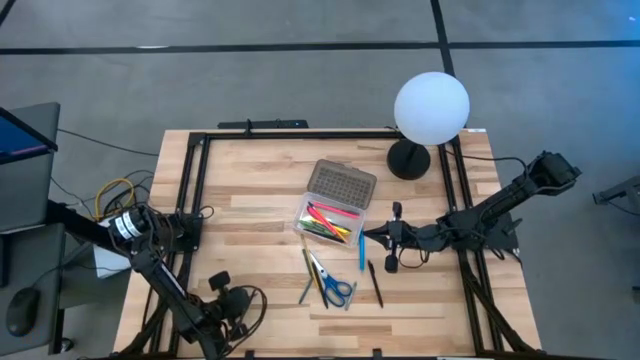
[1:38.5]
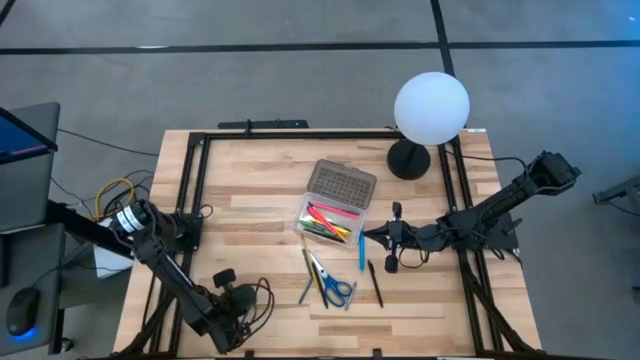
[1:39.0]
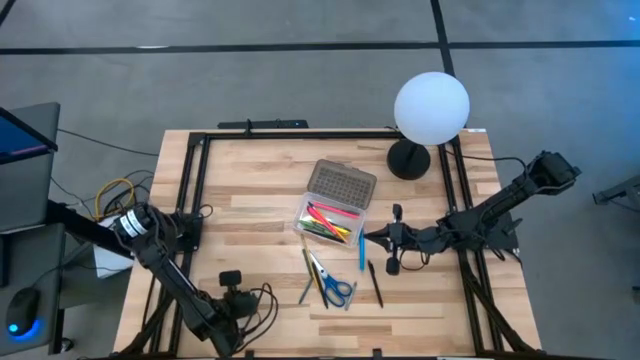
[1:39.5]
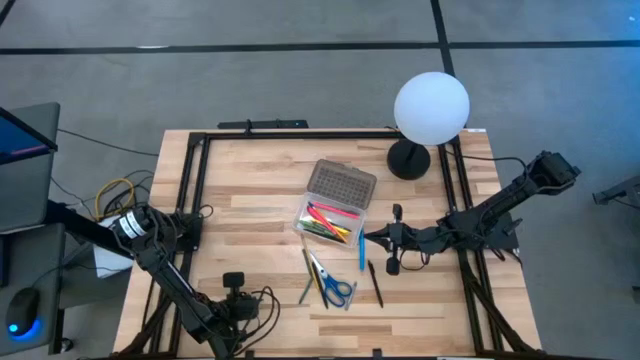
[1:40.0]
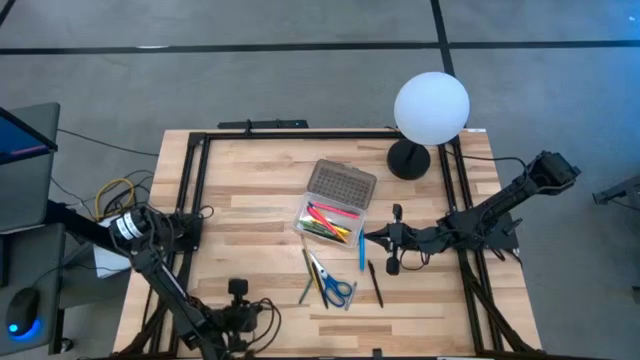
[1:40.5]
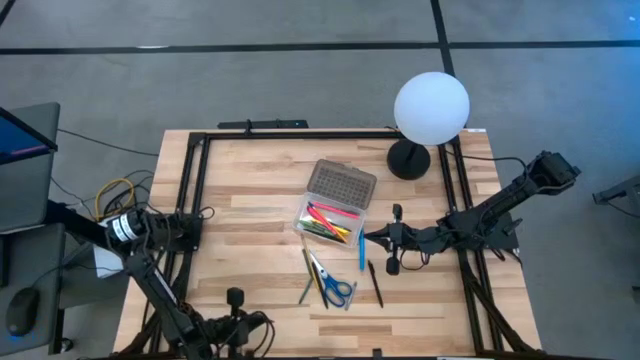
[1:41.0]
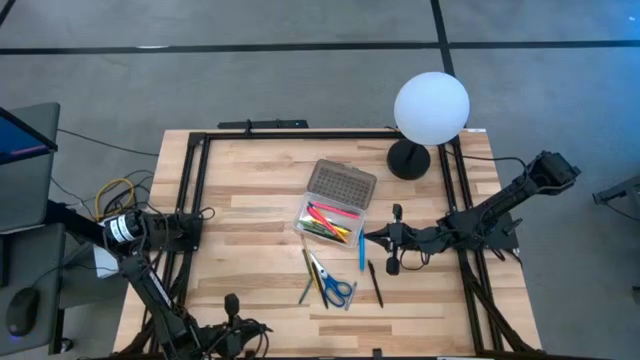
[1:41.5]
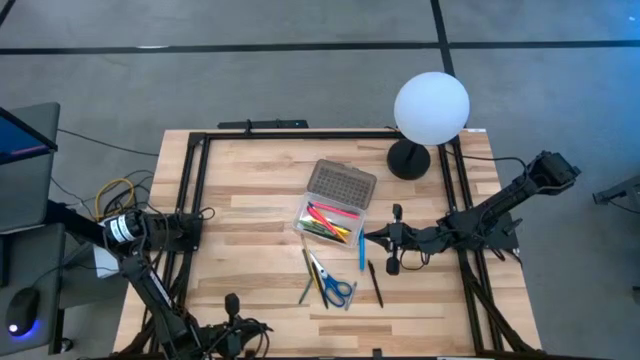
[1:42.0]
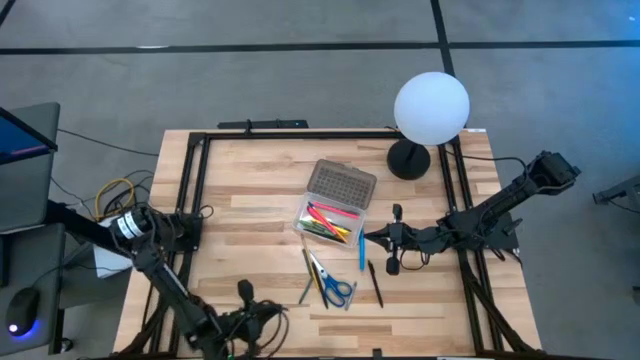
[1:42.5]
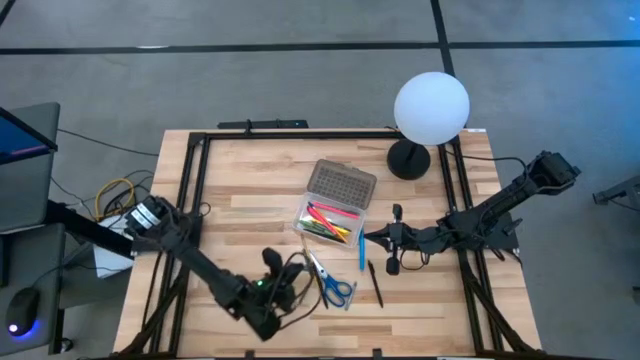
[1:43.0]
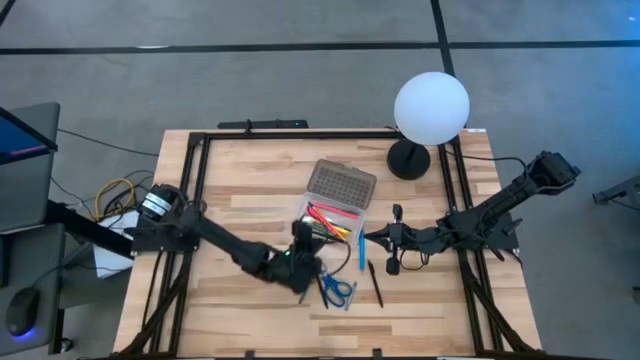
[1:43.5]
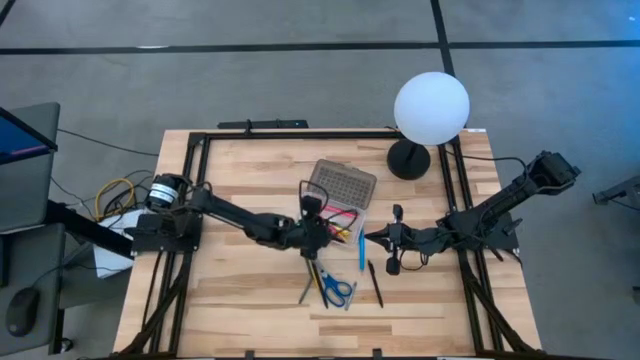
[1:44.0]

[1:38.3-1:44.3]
Task: Pick & place school supplies into a supply box
Put the green crayon into the gray supply box

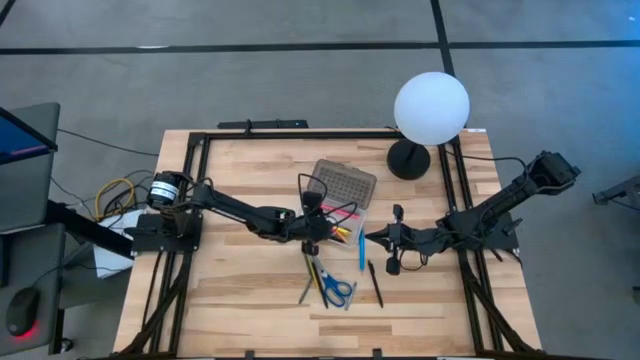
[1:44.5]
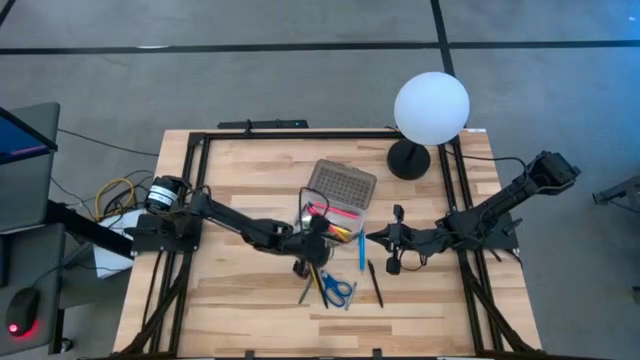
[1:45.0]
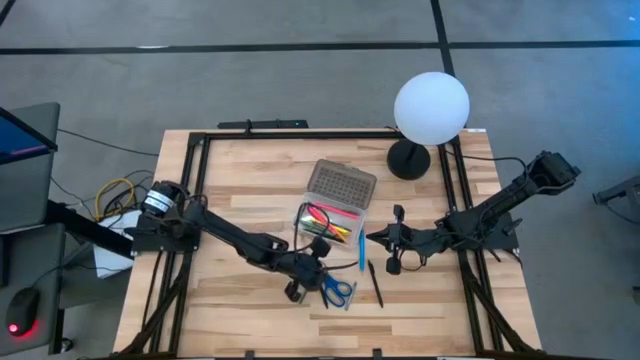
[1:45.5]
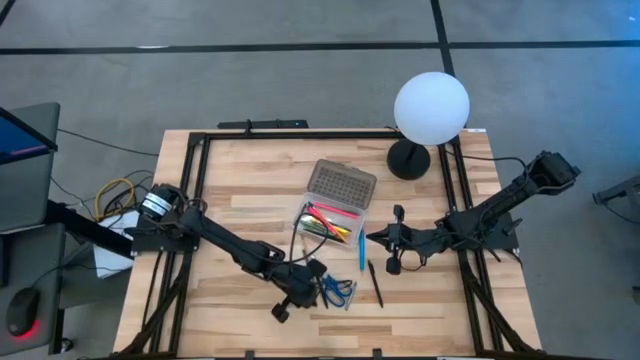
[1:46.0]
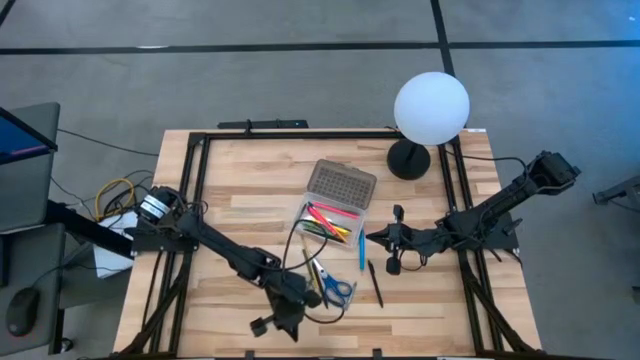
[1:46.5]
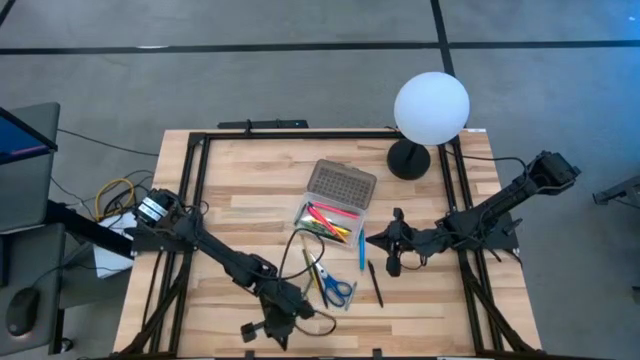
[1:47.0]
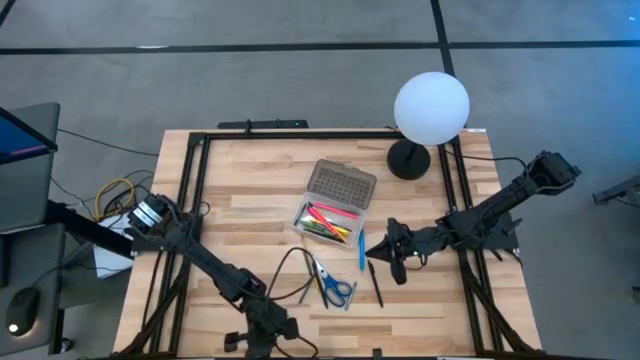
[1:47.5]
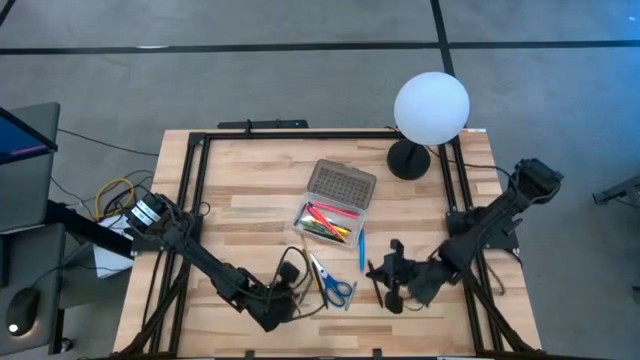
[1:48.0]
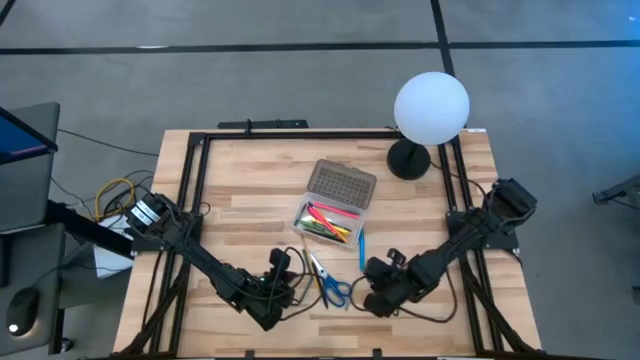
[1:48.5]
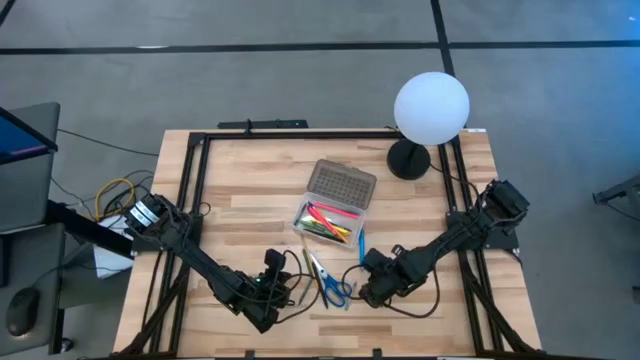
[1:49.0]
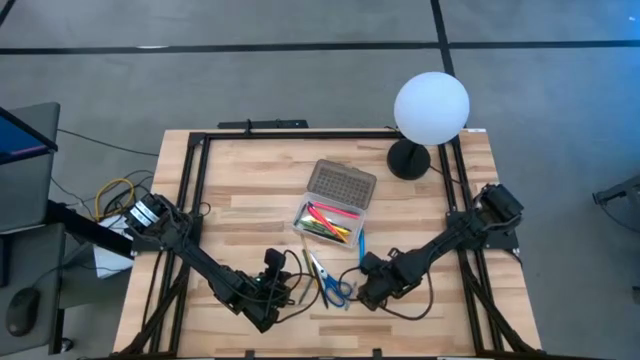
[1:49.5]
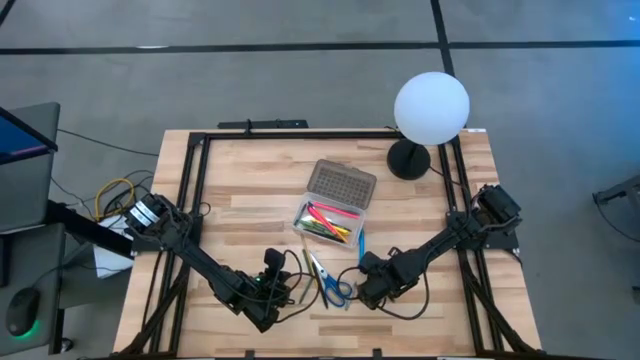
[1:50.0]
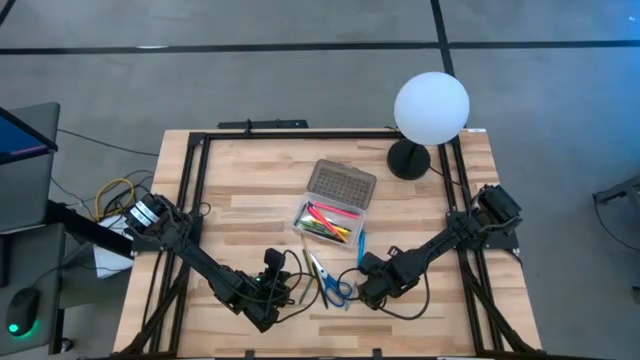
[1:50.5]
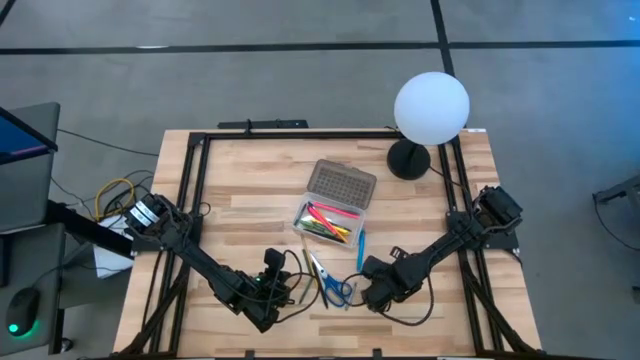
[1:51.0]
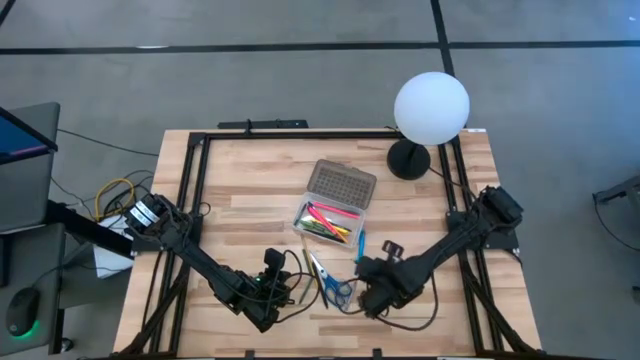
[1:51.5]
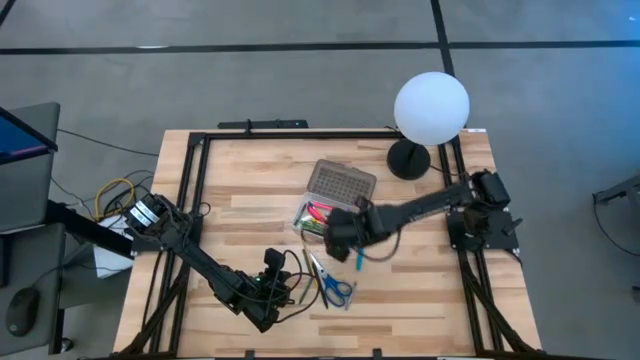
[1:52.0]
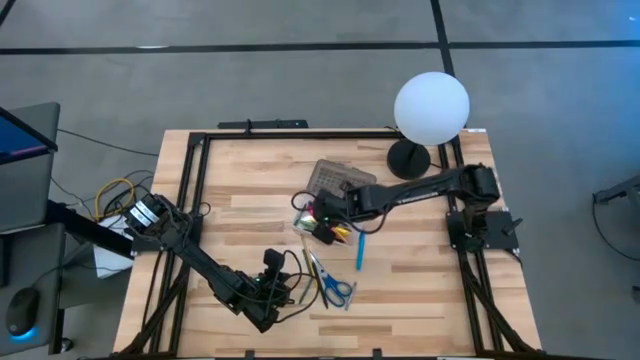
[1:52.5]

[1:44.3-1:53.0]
Put the black pen into the gray supply box

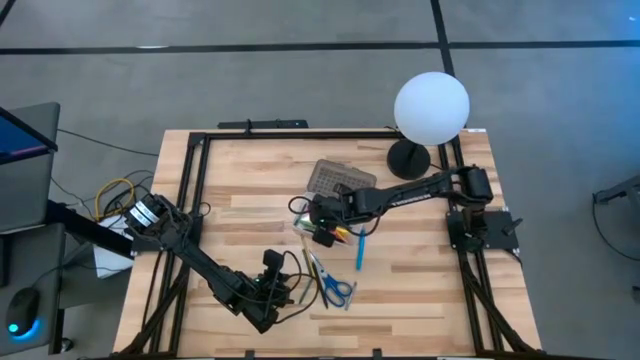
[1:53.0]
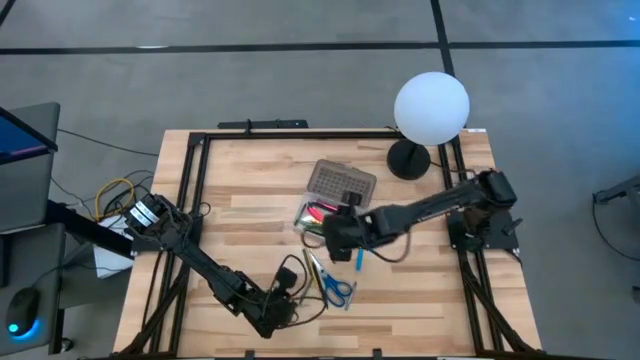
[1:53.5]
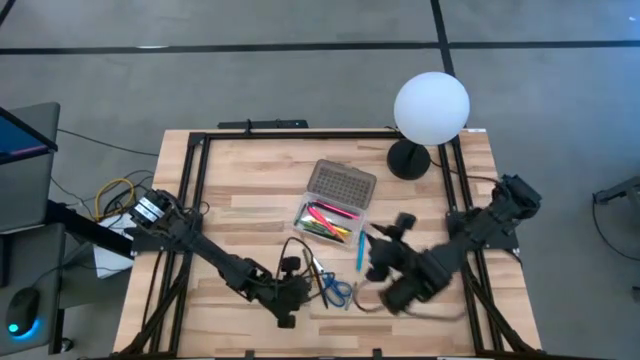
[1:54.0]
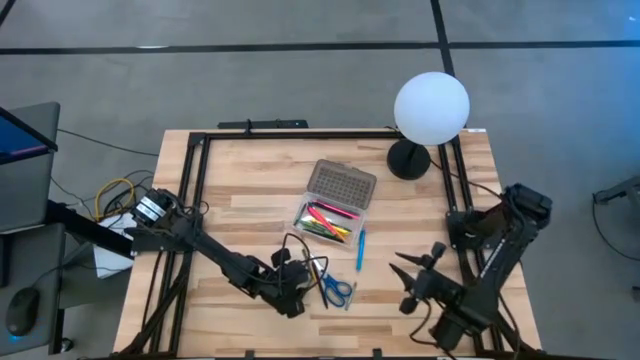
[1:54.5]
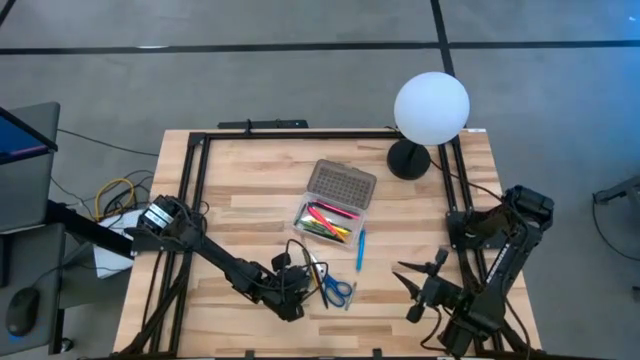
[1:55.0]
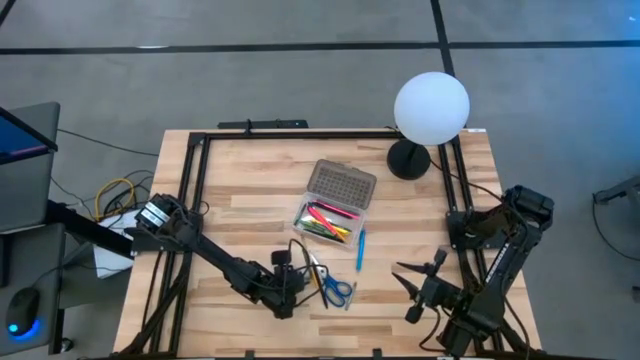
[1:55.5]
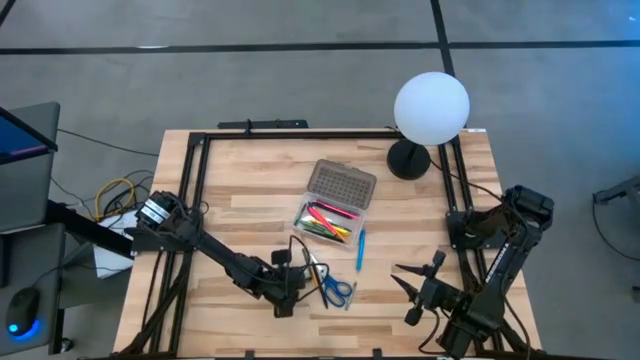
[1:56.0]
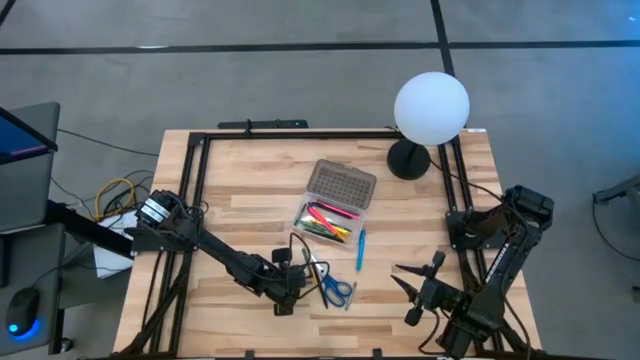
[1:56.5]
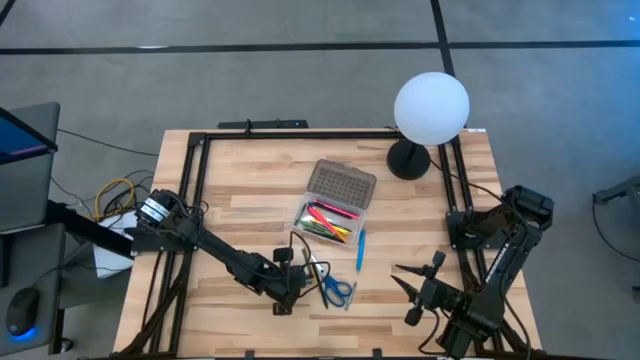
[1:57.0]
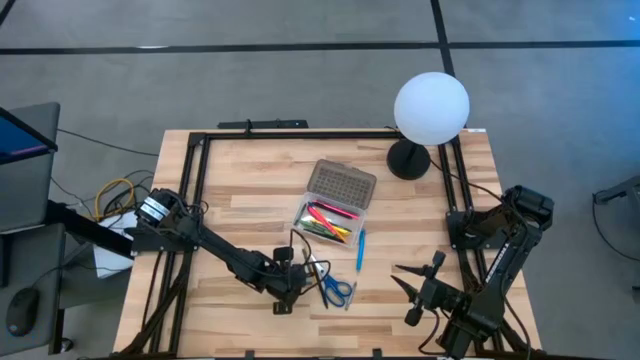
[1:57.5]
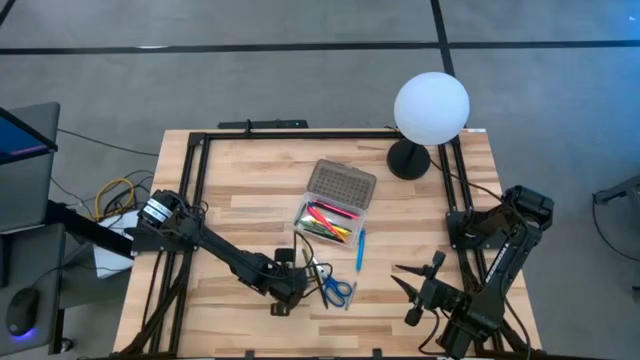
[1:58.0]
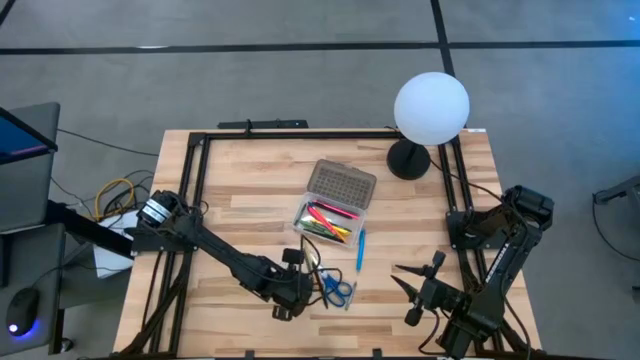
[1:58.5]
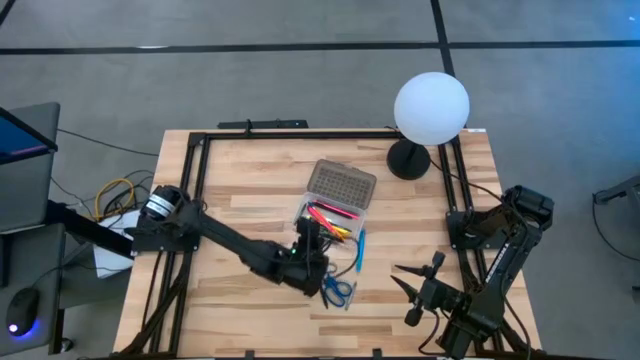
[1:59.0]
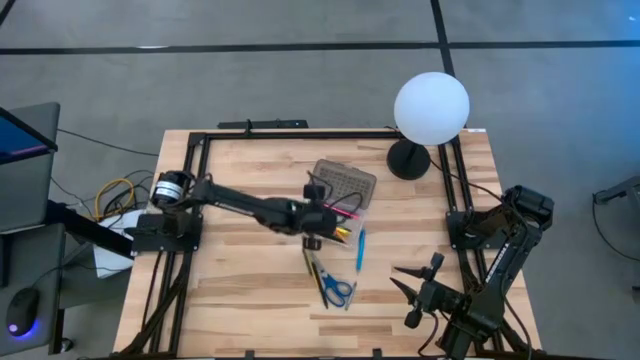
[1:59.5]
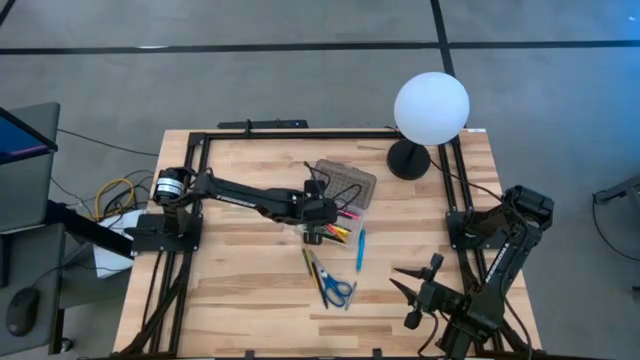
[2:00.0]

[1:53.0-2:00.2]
Put the green crayon into the gray supply box
